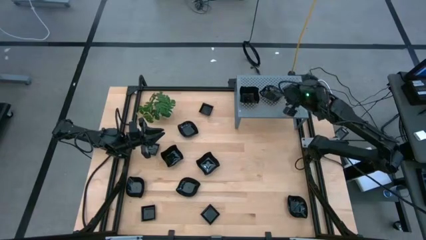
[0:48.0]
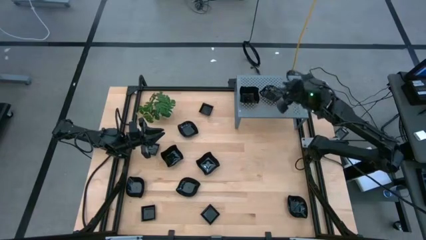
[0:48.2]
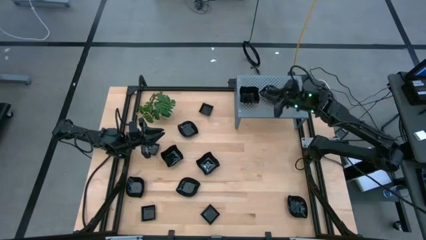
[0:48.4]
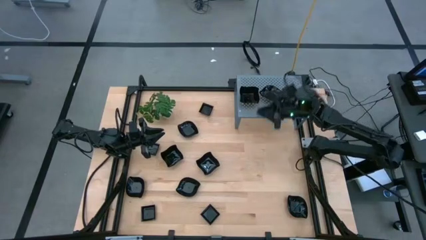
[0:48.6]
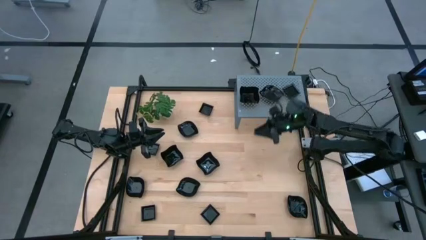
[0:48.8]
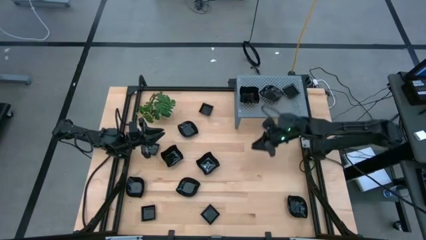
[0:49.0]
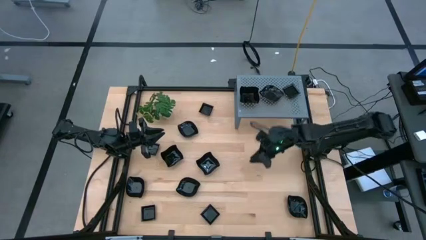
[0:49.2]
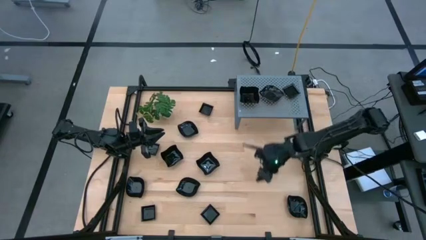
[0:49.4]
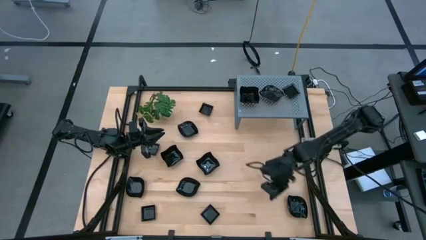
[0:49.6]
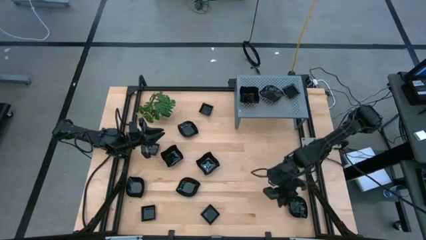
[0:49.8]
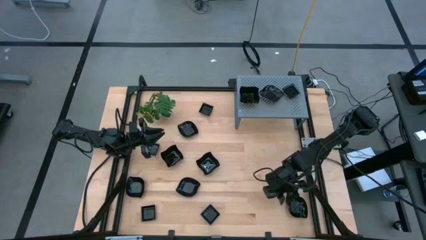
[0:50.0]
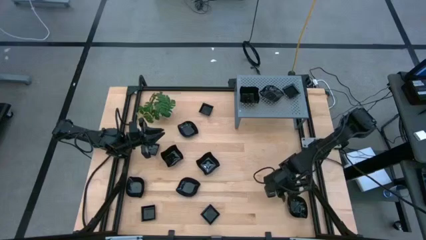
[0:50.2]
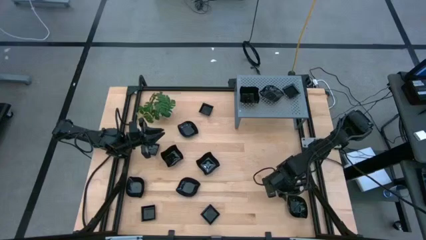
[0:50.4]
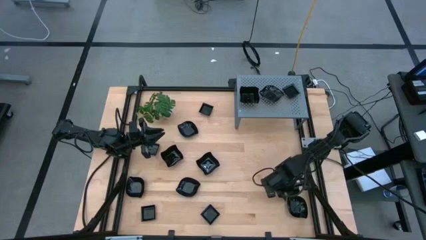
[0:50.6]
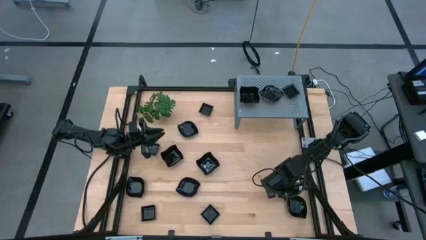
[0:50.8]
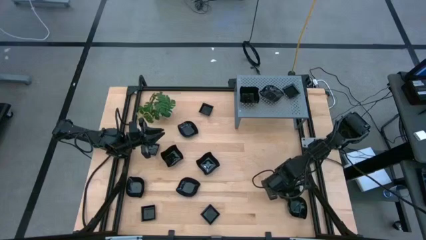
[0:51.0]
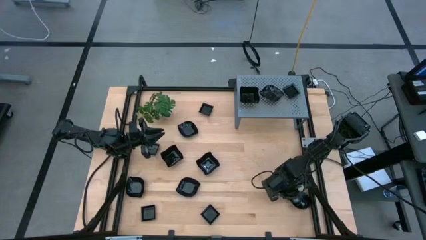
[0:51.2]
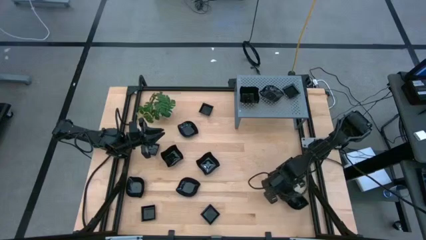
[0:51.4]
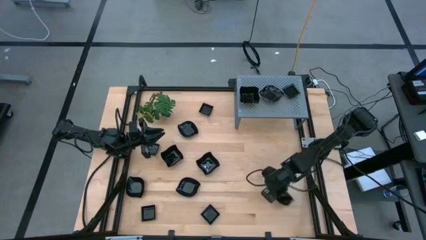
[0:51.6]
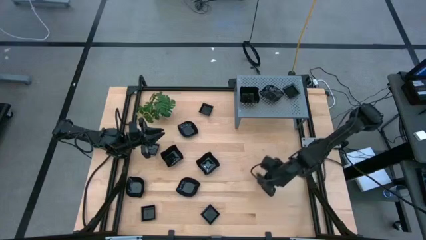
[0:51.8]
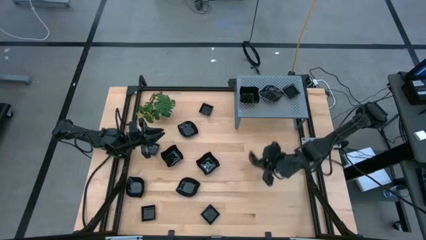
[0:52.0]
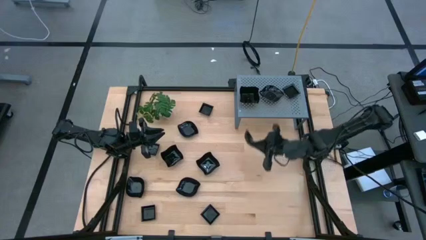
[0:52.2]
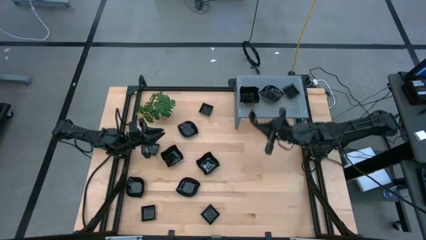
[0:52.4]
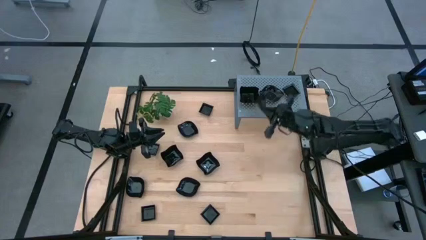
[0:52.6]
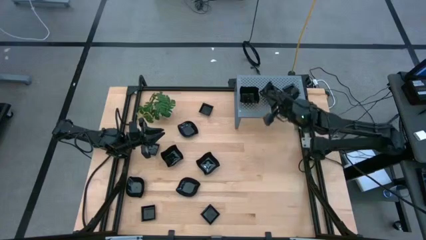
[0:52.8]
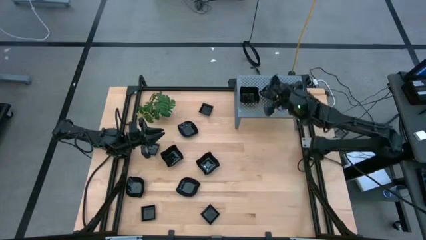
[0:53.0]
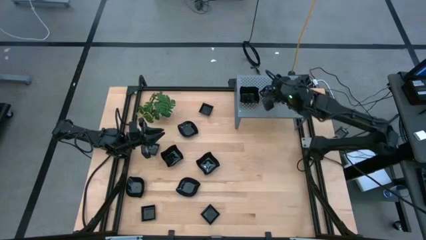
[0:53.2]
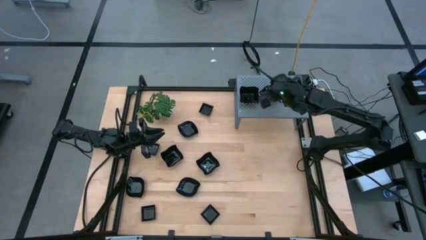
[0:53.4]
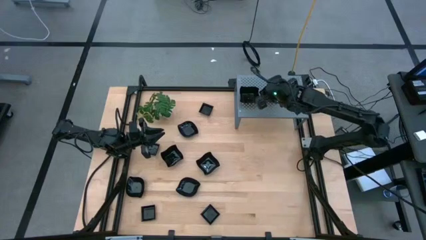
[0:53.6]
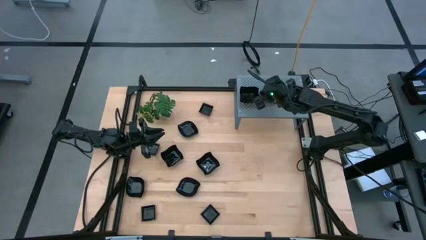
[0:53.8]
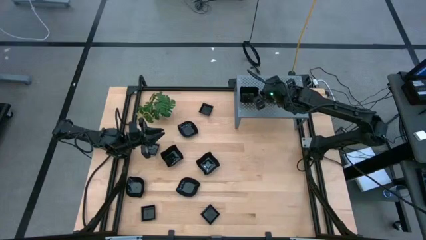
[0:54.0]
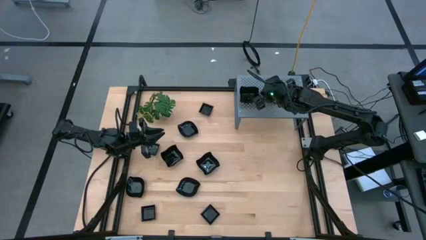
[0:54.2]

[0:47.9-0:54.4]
Task: Pick & Place Mini shaped plates
Stack the leaf shaped plate on top of the leaf shaped plate on the shelf

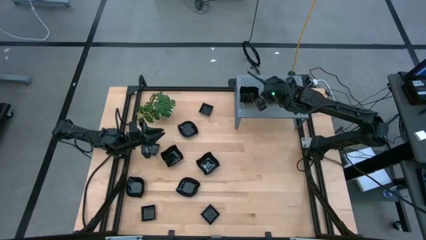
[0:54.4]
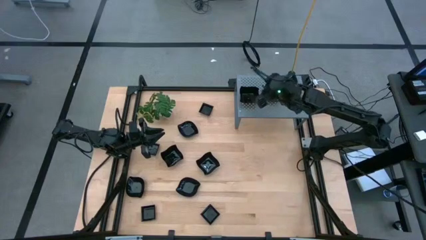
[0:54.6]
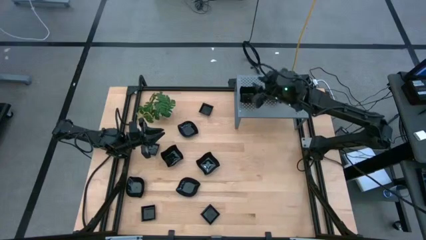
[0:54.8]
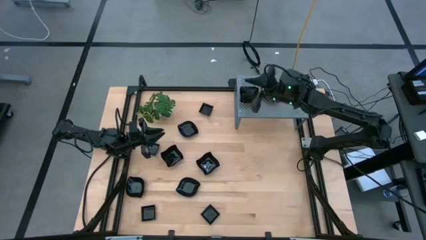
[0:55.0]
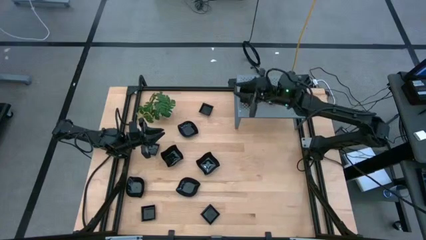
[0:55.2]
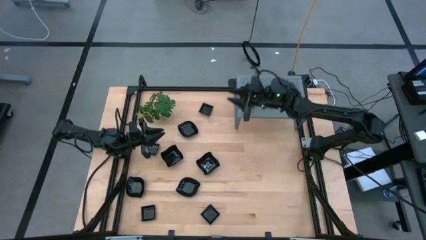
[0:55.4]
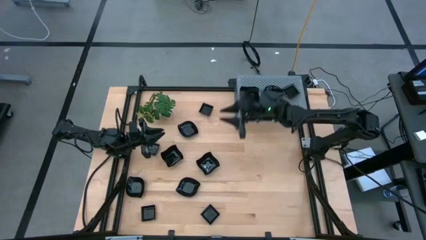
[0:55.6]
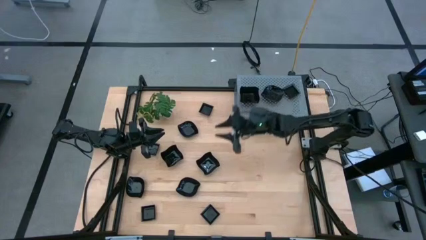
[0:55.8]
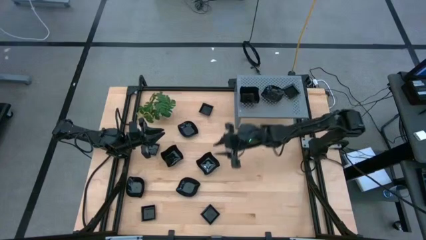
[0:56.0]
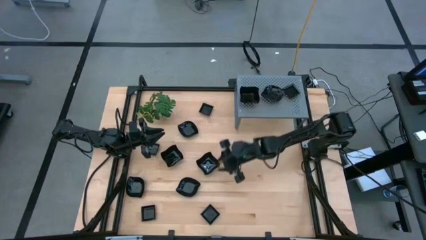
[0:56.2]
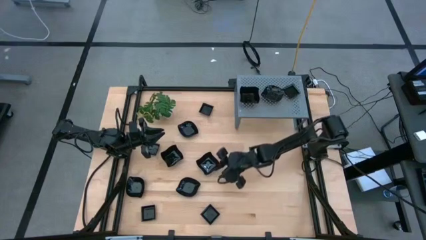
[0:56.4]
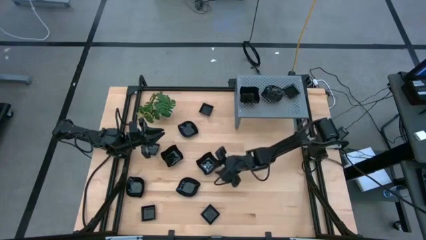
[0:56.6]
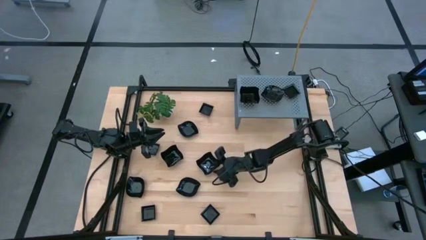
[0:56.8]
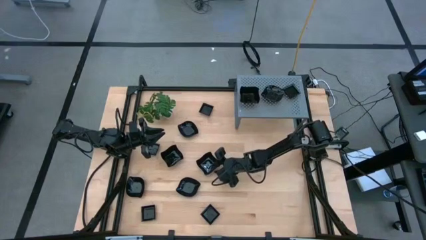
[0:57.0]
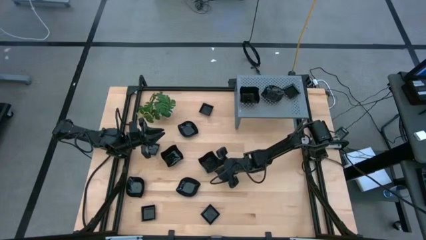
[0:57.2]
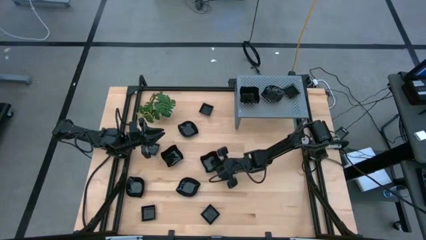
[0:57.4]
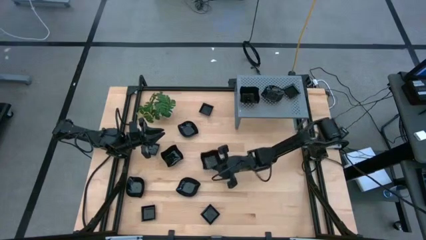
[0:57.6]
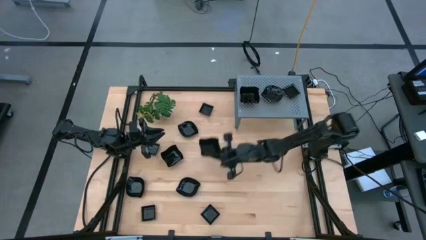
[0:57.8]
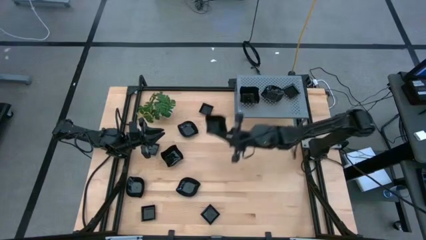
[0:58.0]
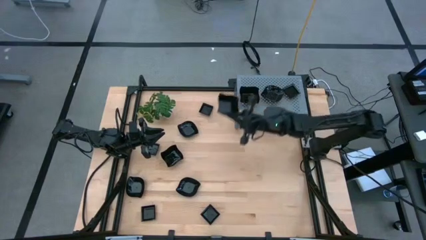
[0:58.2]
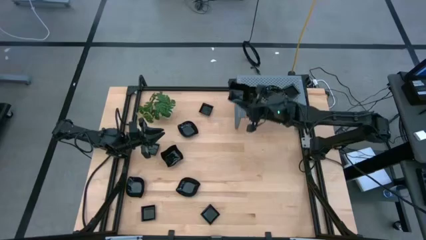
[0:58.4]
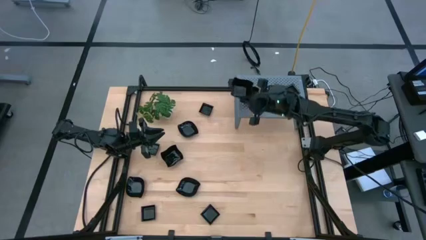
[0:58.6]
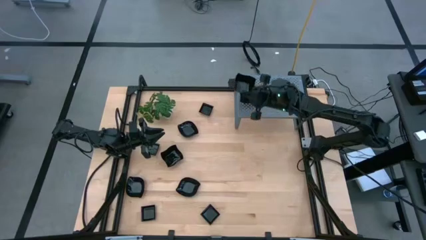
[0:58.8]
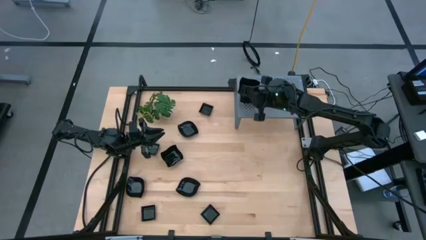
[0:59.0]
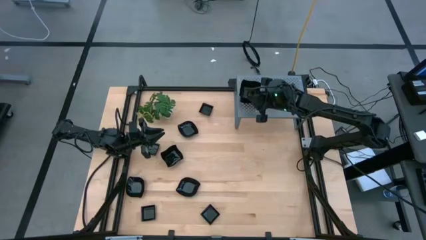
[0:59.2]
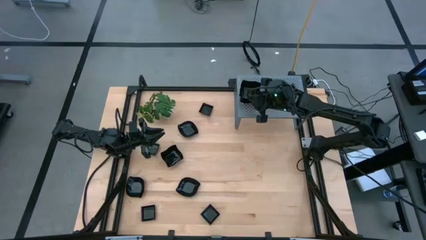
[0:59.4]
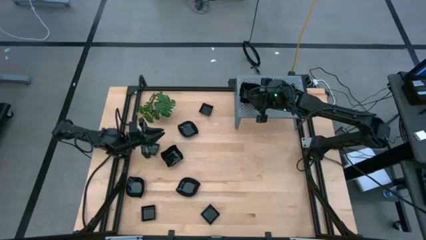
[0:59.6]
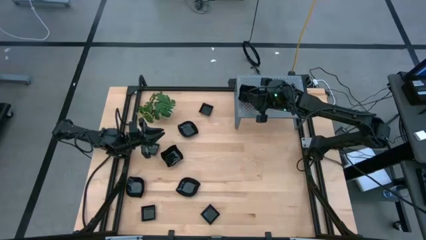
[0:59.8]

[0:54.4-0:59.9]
Stack the distorted square plate on top of the distorted square plates on the shelf

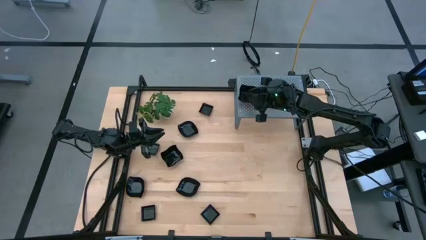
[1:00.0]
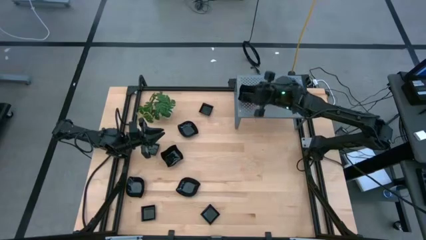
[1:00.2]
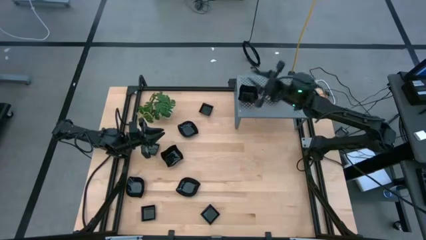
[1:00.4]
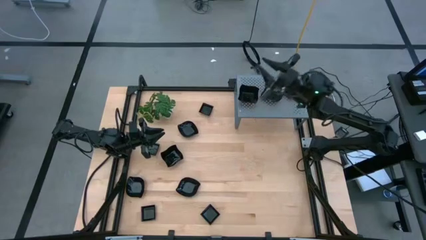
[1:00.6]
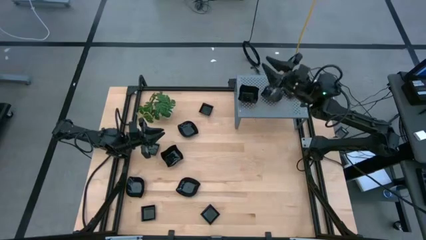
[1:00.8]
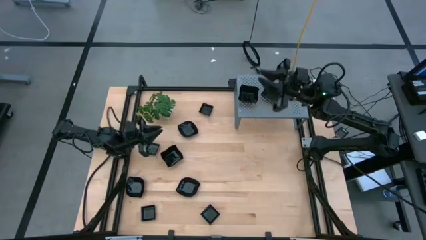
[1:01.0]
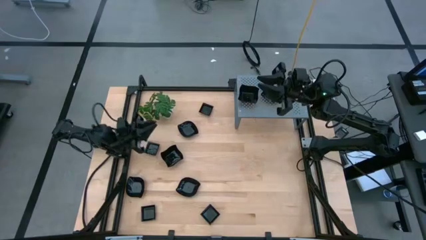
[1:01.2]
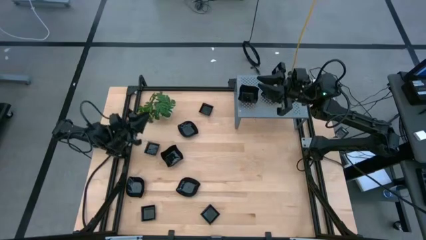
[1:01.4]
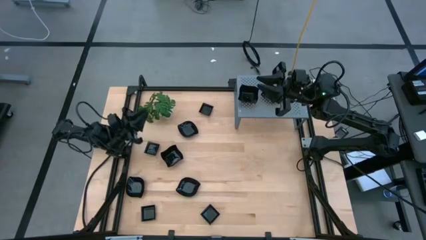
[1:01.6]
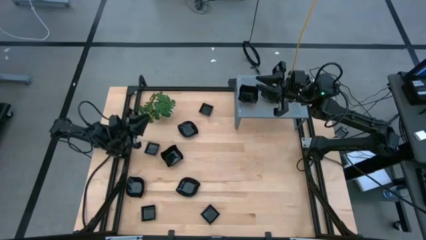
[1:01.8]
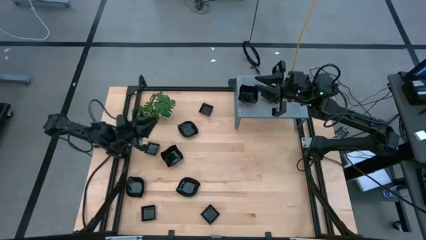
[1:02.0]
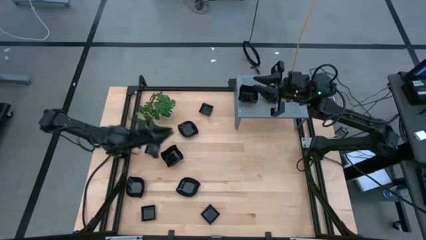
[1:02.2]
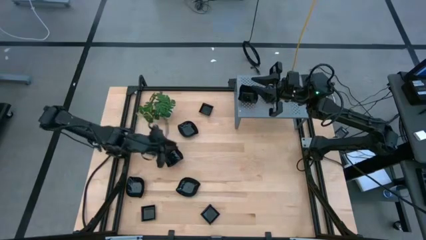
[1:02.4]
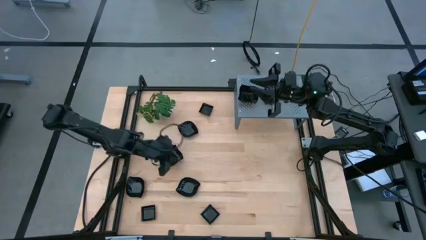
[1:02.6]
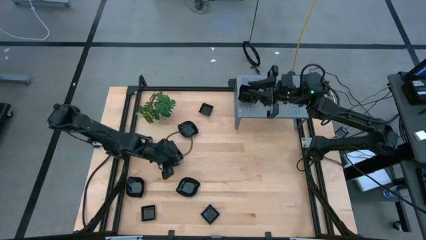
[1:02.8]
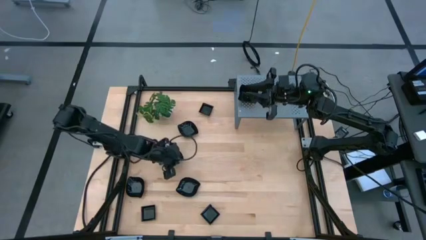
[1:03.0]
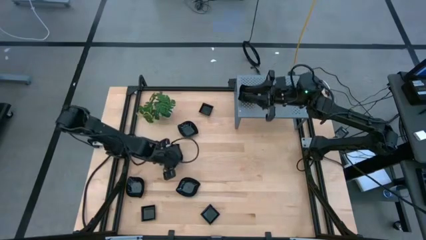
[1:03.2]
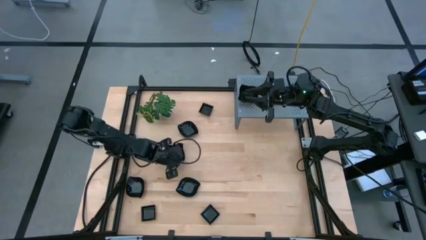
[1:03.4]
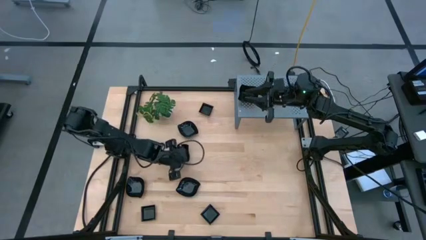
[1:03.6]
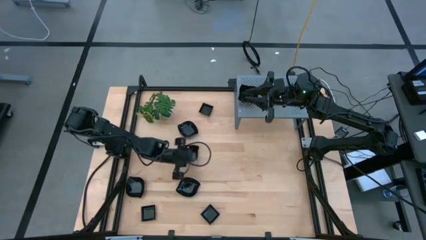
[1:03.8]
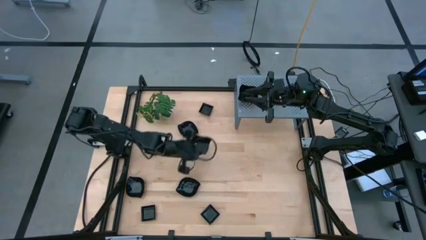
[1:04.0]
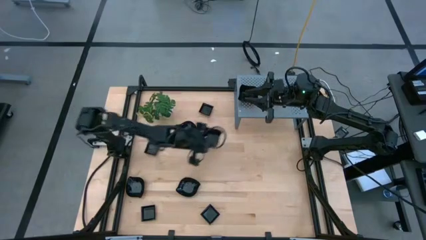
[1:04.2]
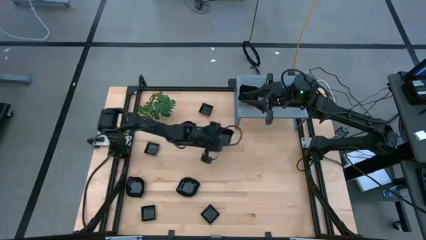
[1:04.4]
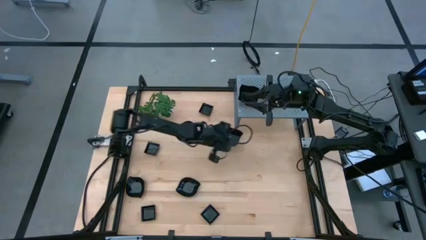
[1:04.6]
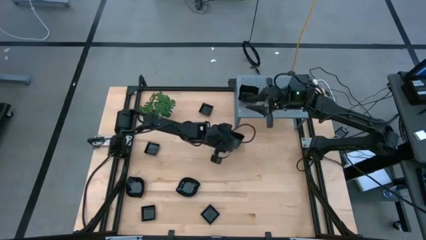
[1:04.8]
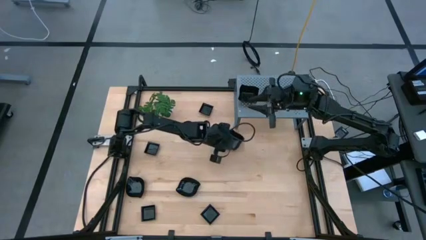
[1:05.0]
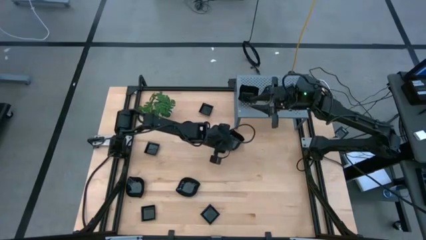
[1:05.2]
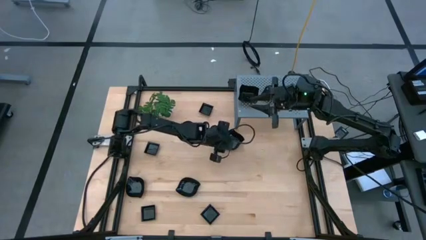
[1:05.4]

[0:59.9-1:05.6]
Move the distorted square plate to the center of the table
